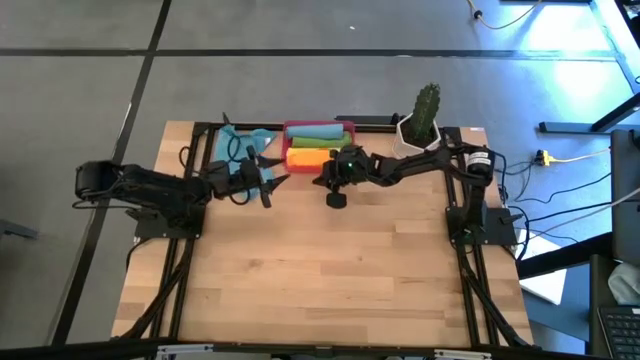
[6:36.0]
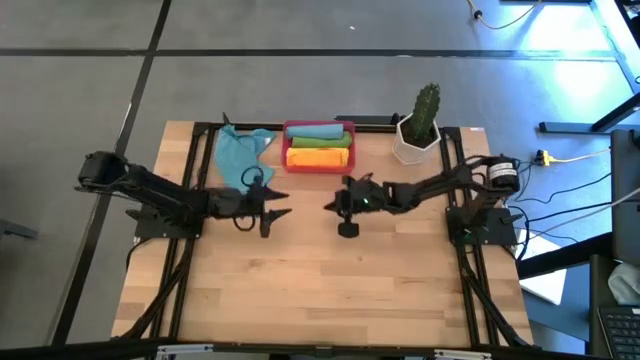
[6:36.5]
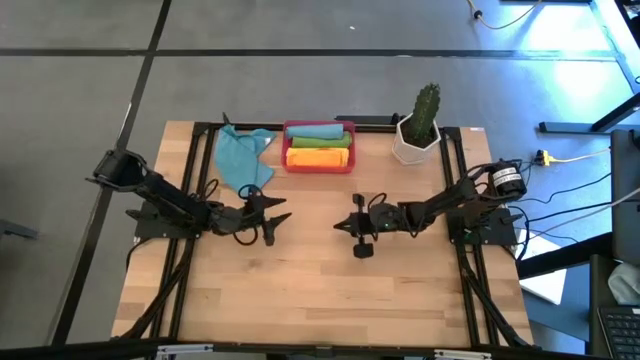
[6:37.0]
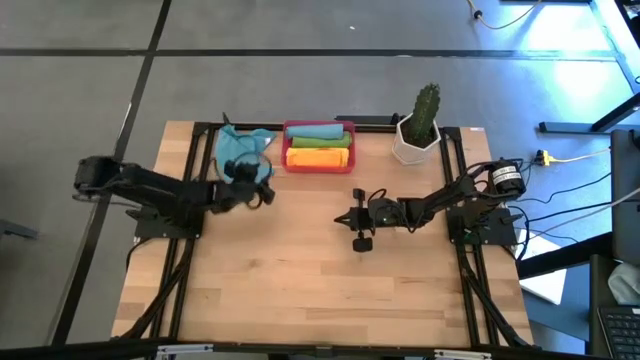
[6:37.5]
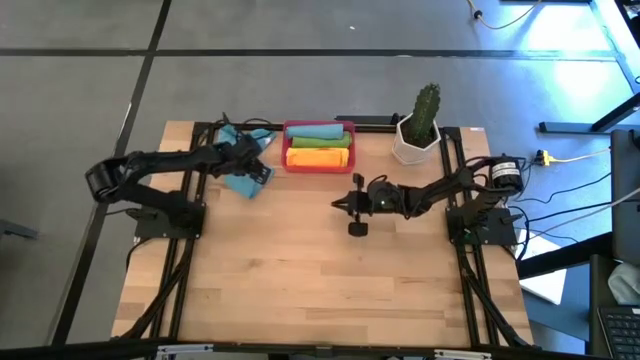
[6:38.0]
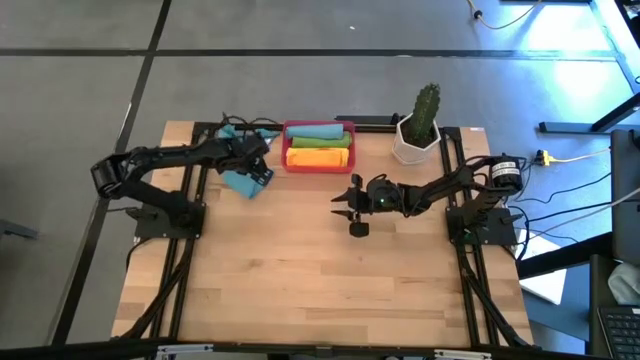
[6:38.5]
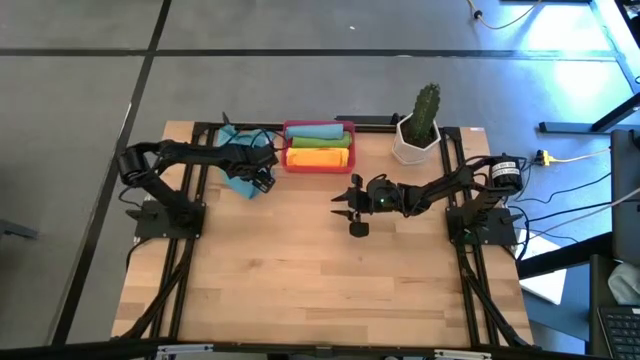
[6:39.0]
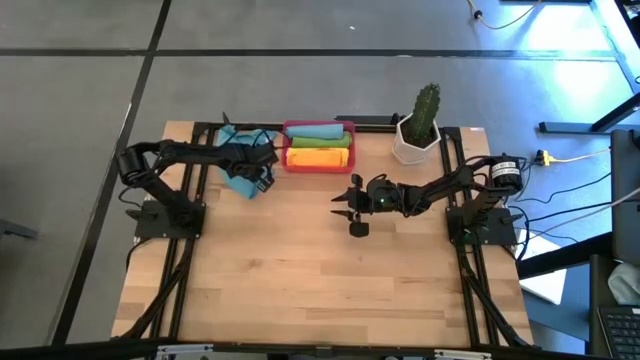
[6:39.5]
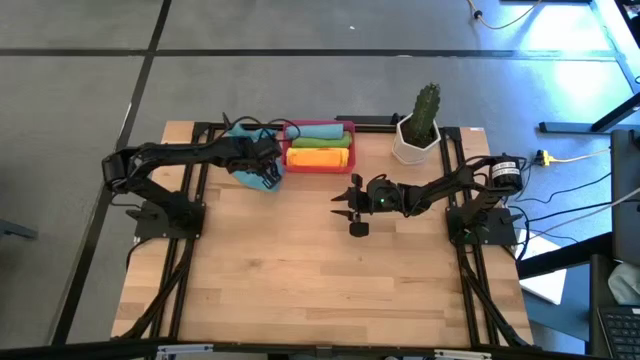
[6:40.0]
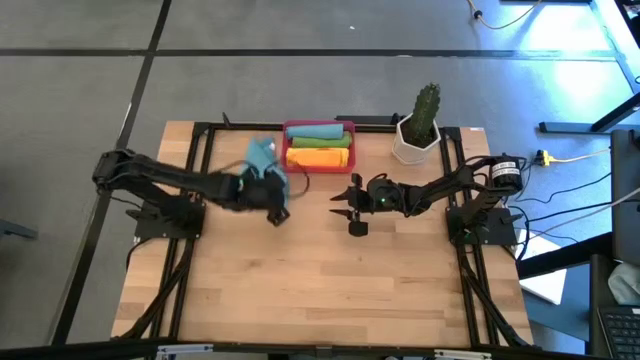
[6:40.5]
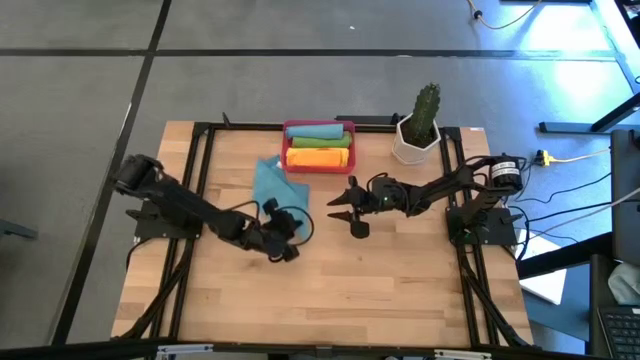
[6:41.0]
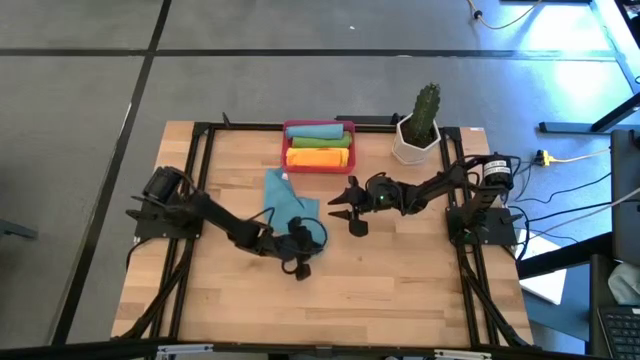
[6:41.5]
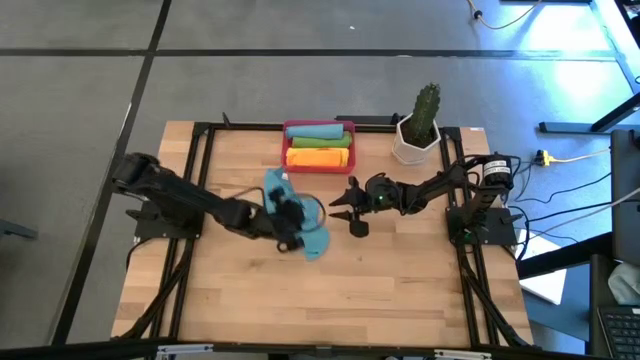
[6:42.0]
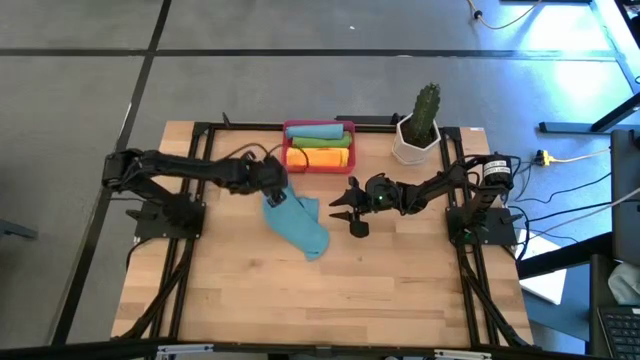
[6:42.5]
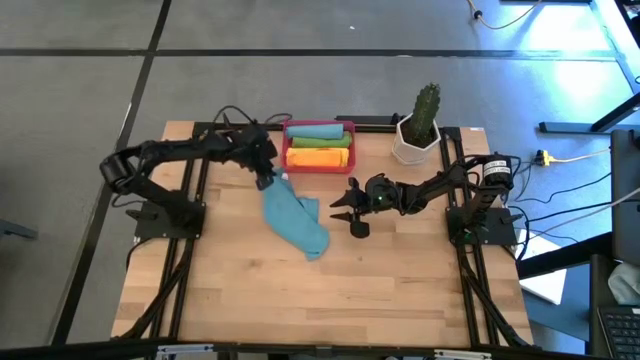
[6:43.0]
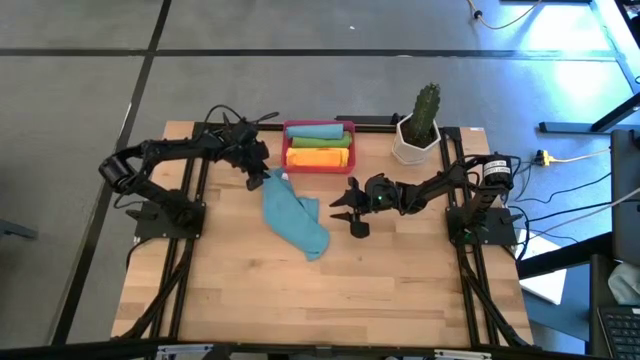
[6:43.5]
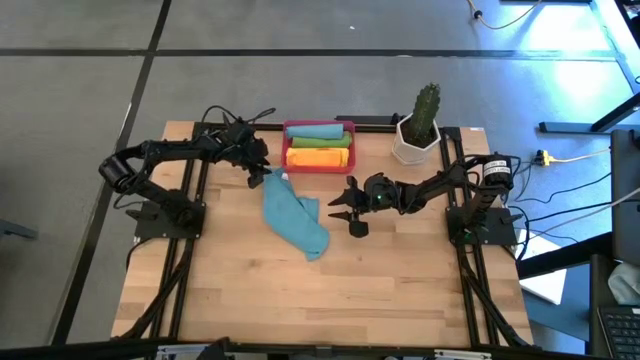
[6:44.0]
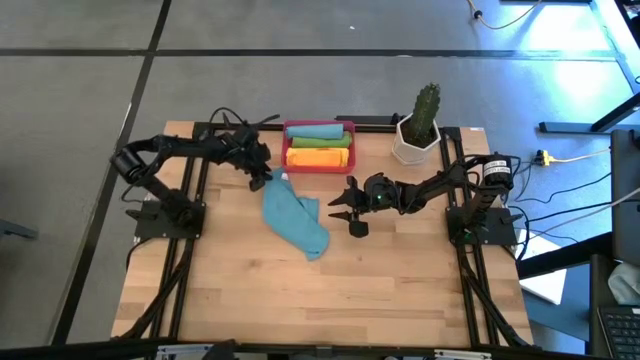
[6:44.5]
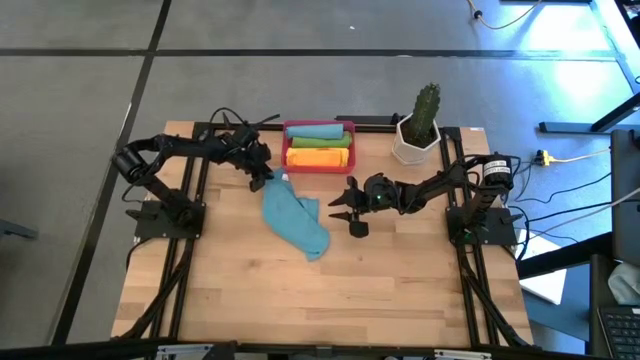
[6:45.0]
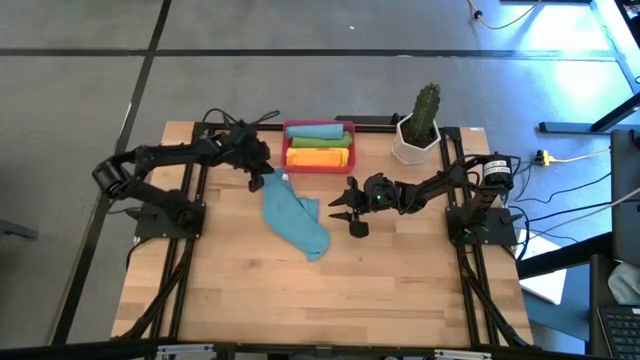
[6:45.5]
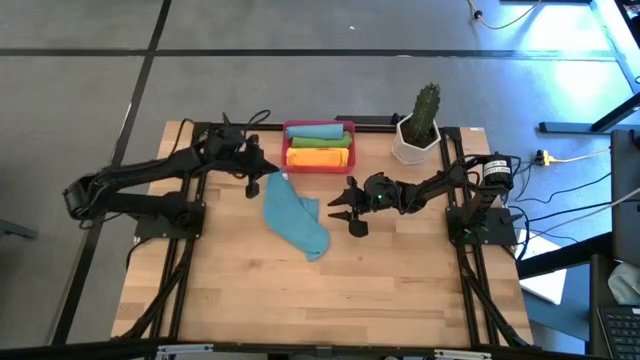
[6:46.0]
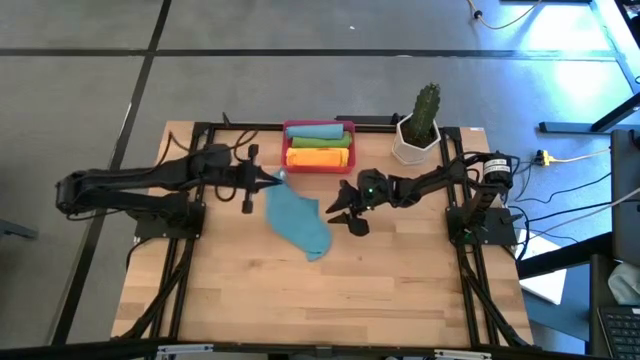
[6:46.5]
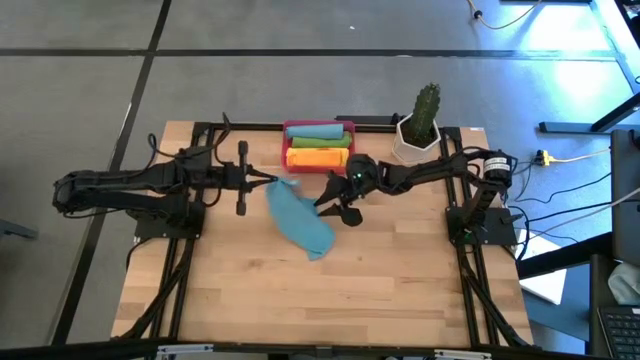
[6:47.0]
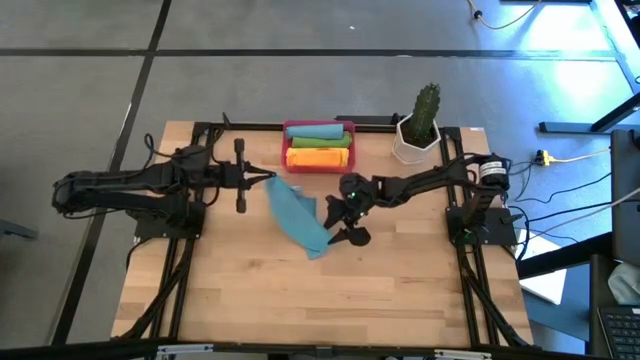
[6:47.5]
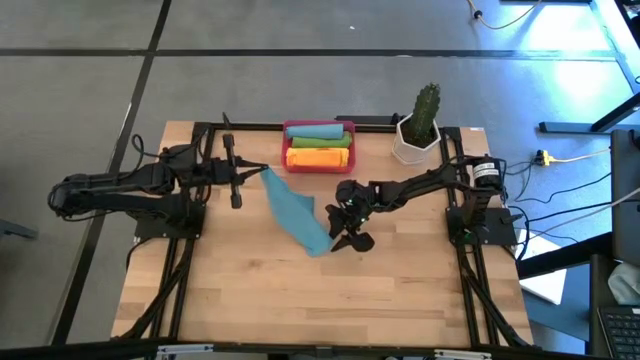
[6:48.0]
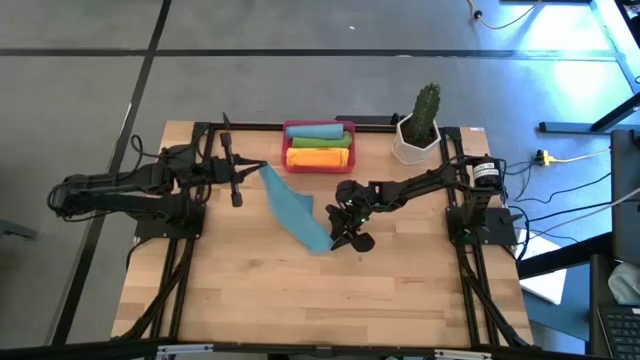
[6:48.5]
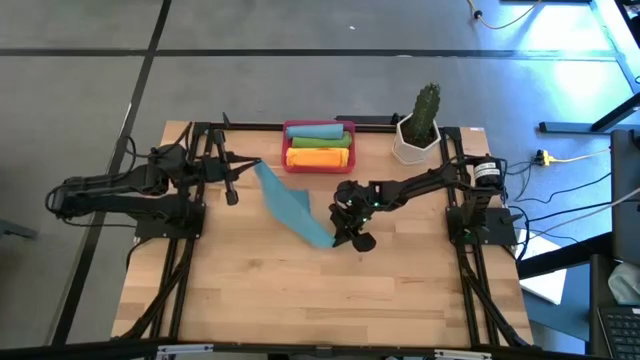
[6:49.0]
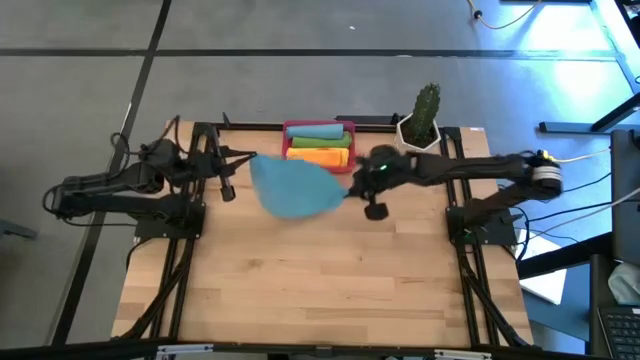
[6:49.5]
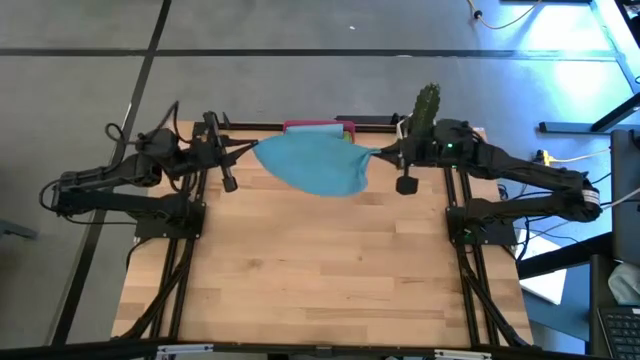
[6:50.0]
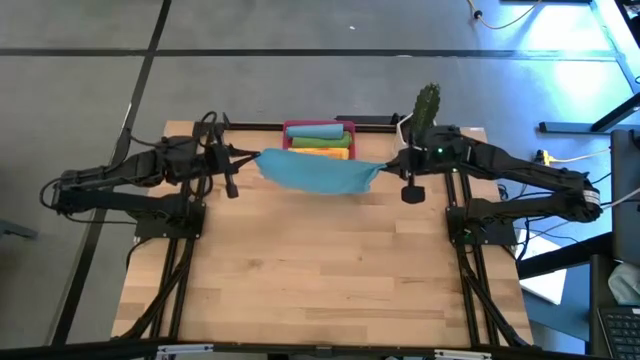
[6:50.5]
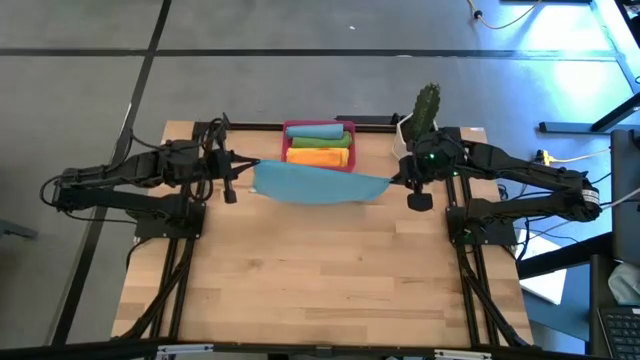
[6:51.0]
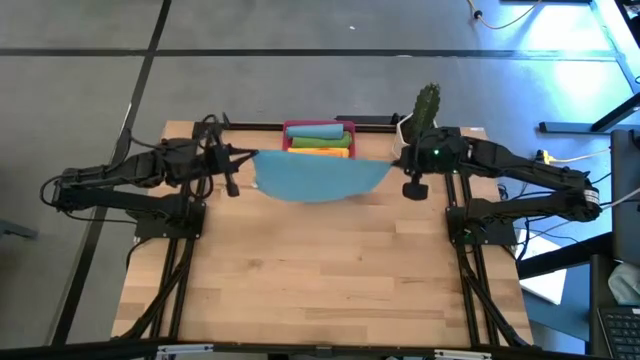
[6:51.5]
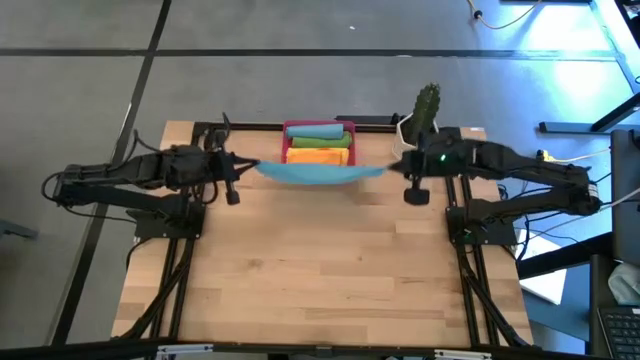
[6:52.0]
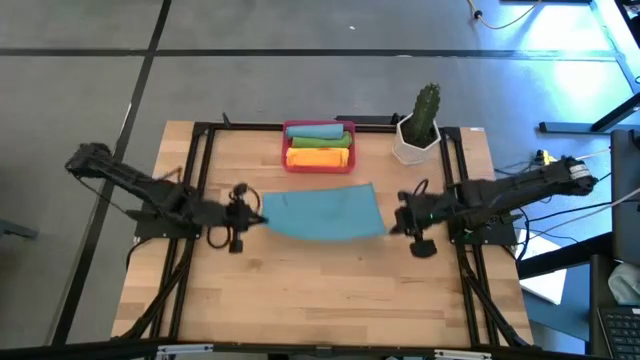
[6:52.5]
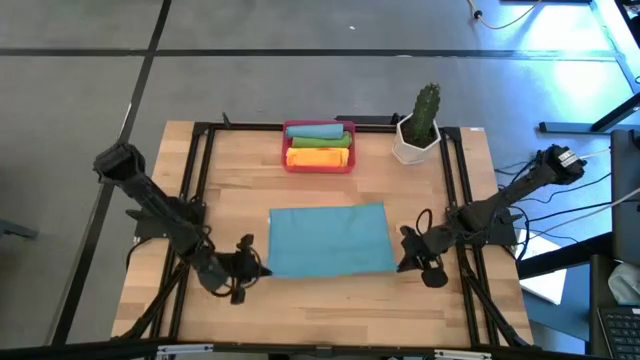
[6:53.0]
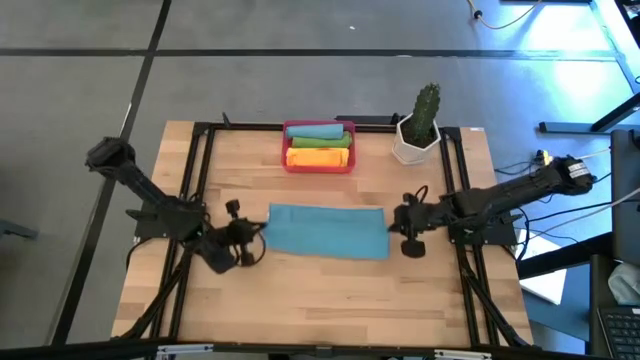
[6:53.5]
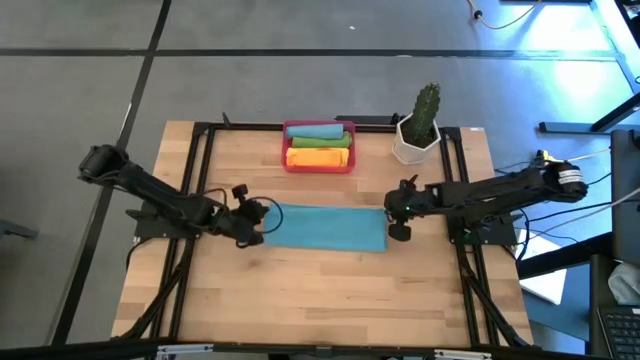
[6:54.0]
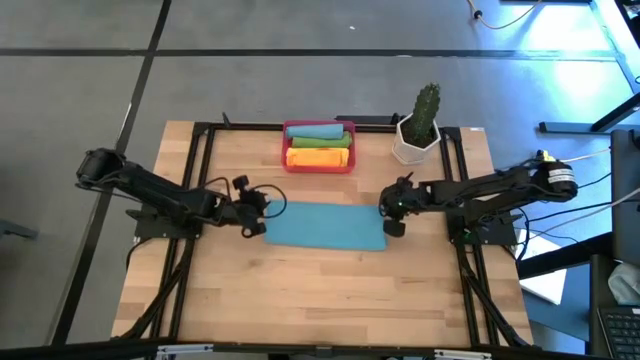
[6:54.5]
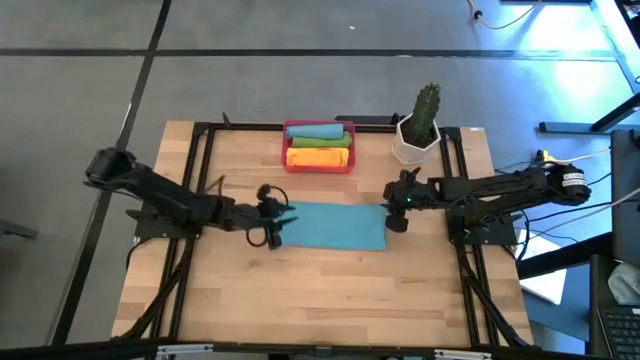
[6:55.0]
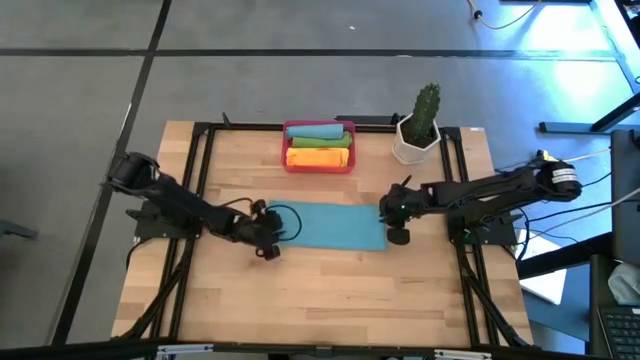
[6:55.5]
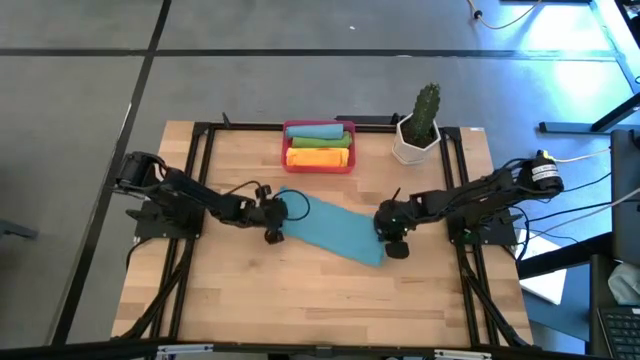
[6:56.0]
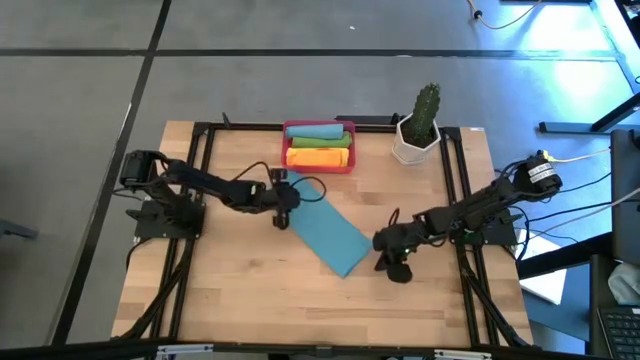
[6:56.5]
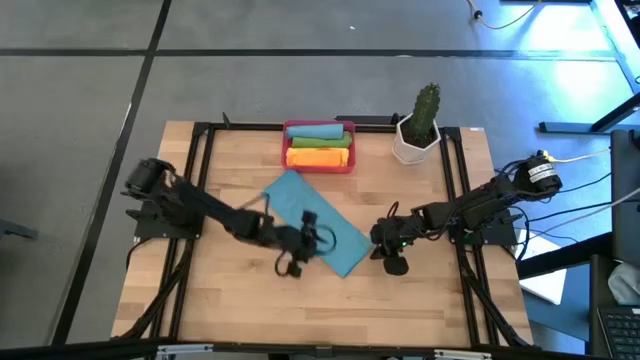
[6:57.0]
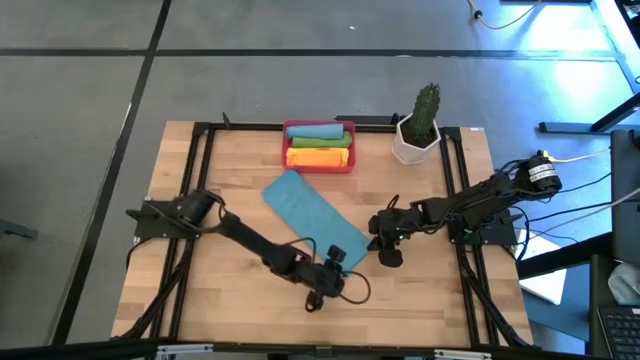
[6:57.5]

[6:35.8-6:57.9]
Task: Roll microfiber towels into tight, uniform cylinder then place into a basket
Roll the blue towel
